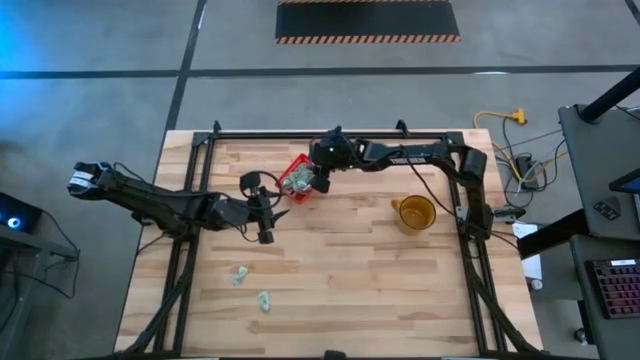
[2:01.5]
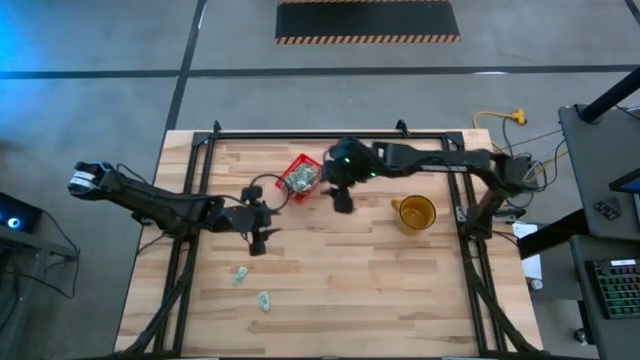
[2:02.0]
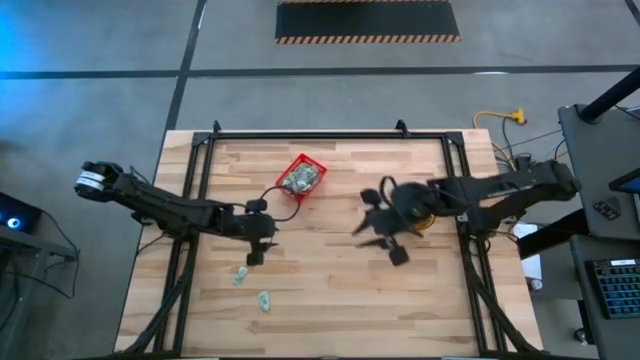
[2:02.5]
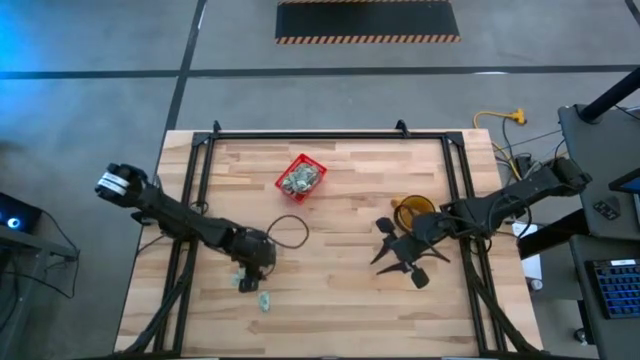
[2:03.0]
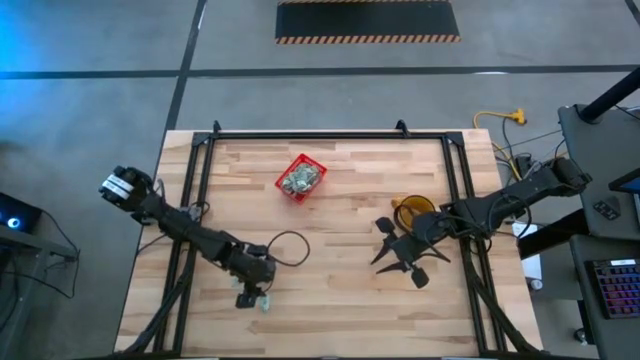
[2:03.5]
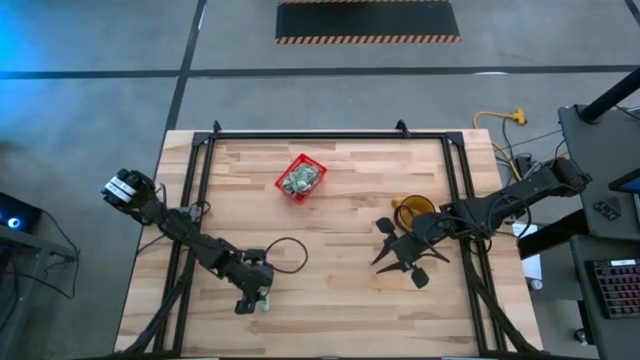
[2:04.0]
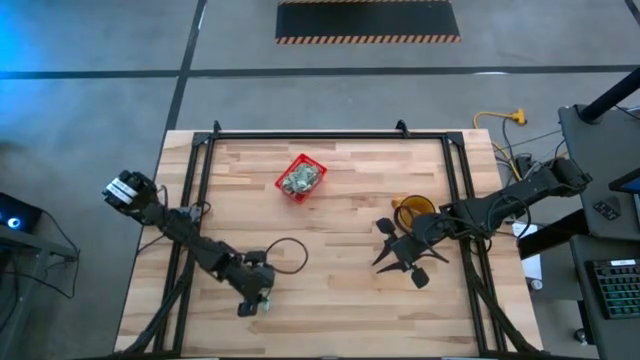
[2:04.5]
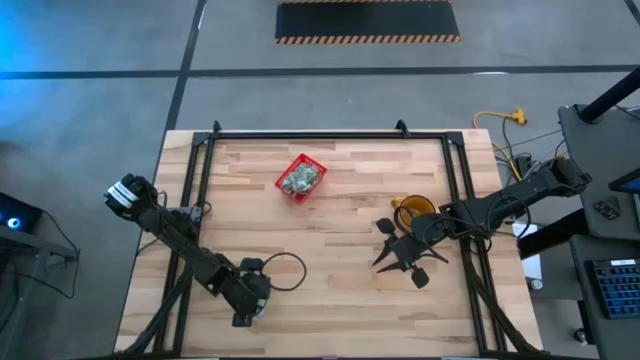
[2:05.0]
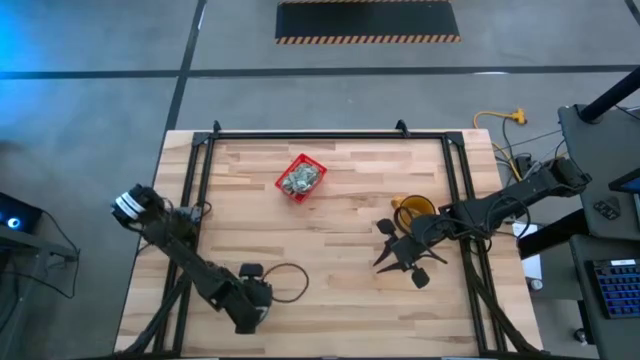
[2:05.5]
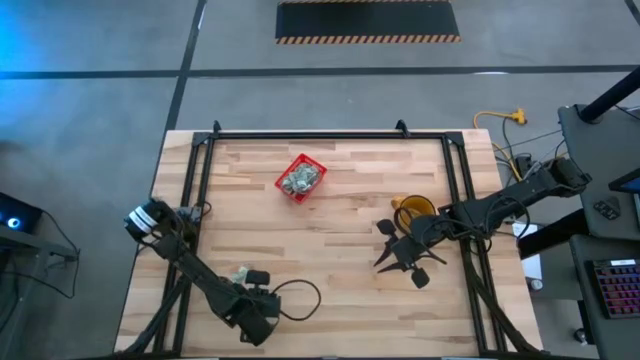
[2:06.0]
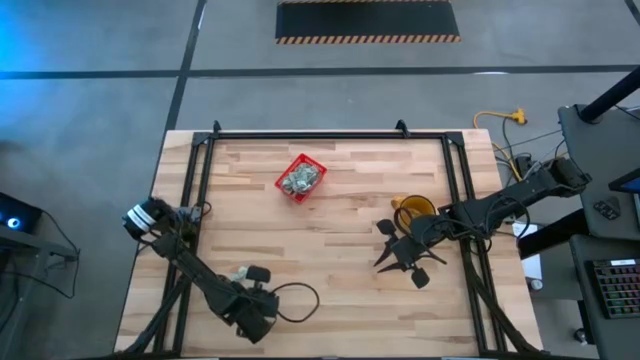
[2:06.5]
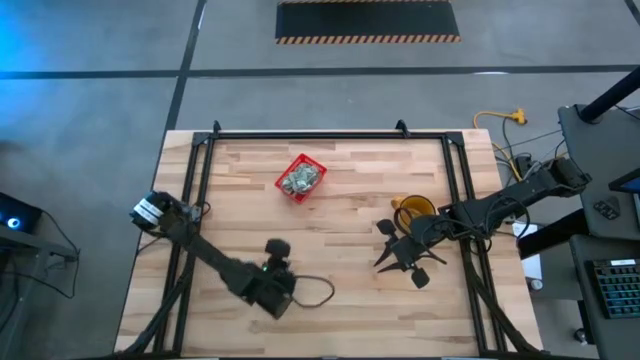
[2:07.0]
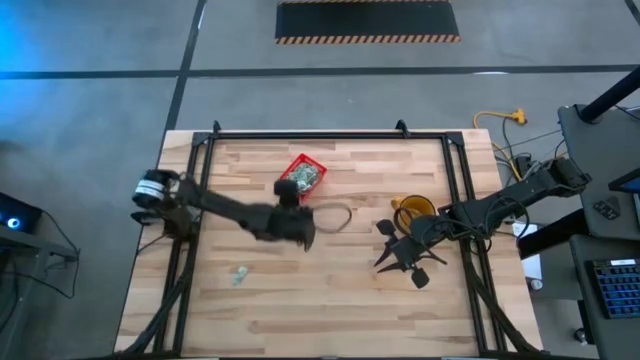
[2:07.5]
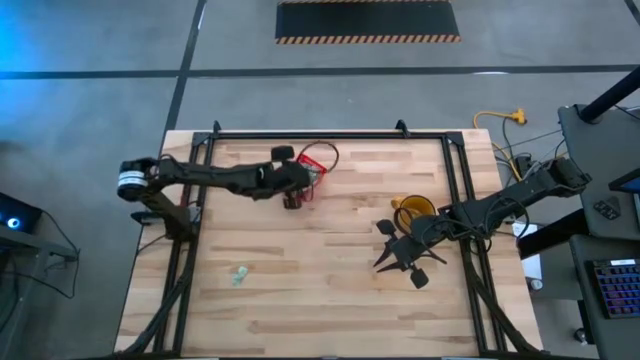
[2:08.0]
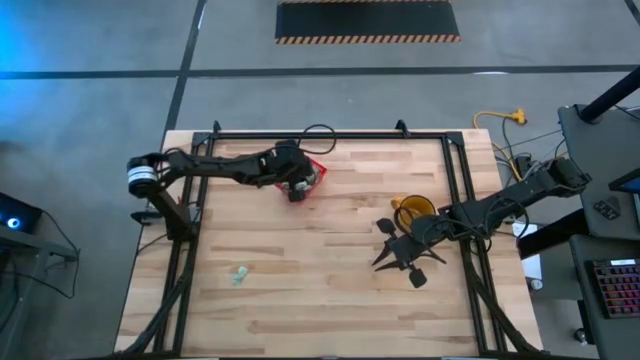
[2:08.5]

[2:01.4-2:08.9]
Task: Pick and place Stevia / Truvia into bins
Put the white stevia packet into the red bin

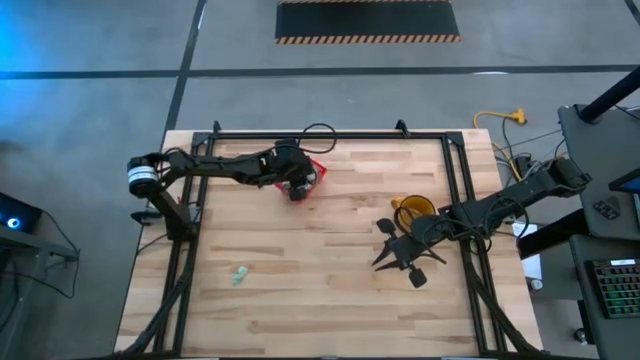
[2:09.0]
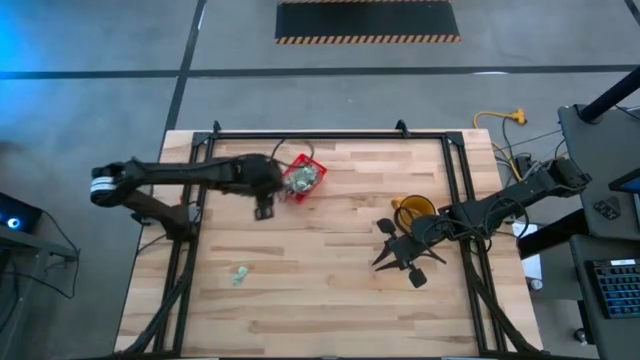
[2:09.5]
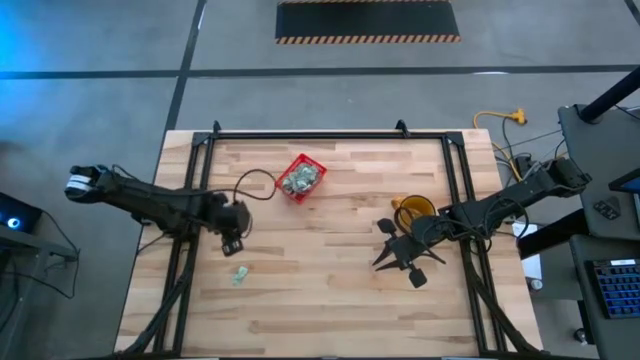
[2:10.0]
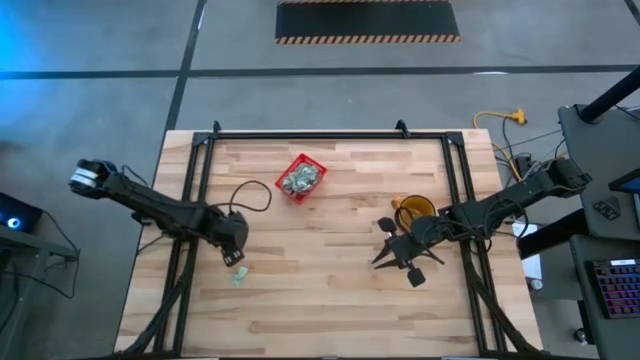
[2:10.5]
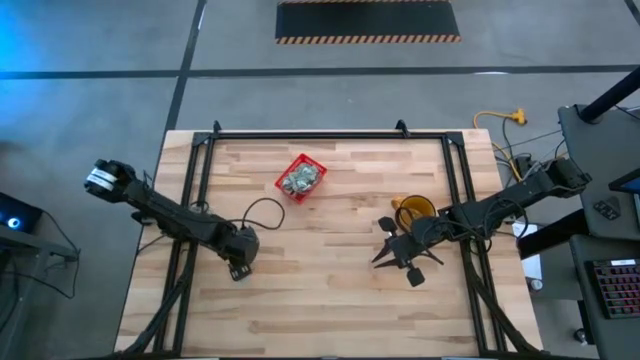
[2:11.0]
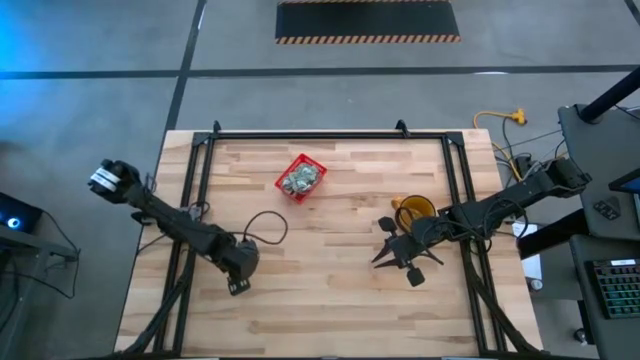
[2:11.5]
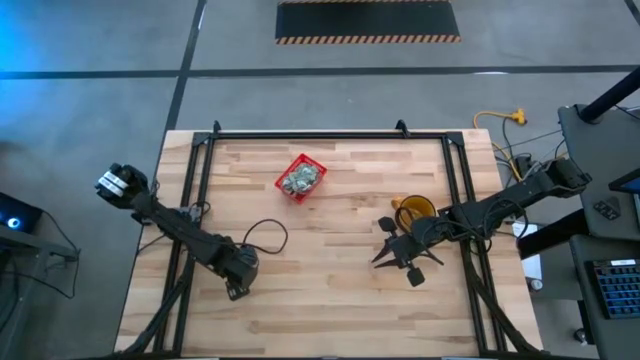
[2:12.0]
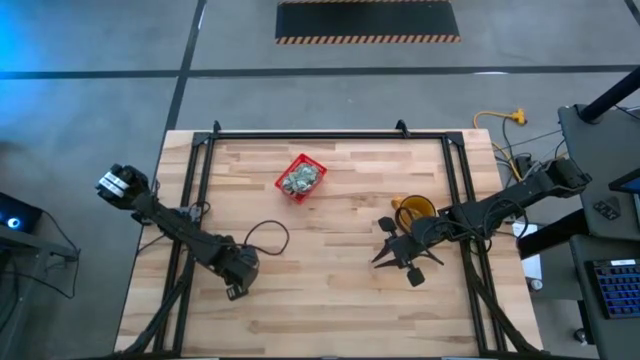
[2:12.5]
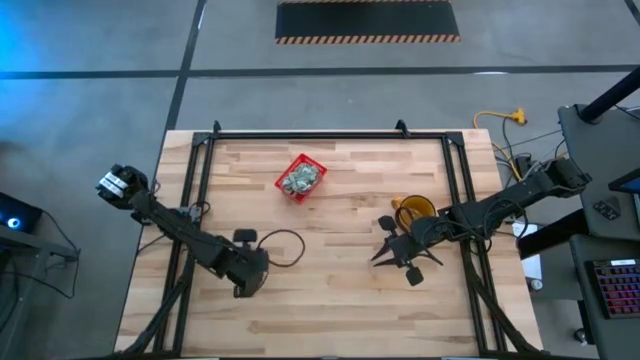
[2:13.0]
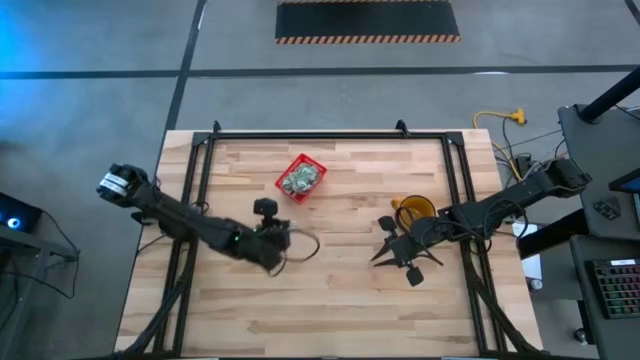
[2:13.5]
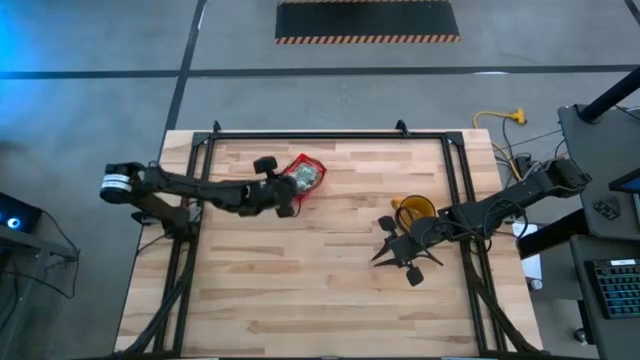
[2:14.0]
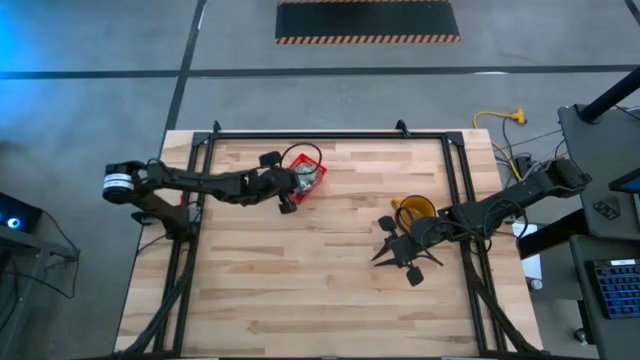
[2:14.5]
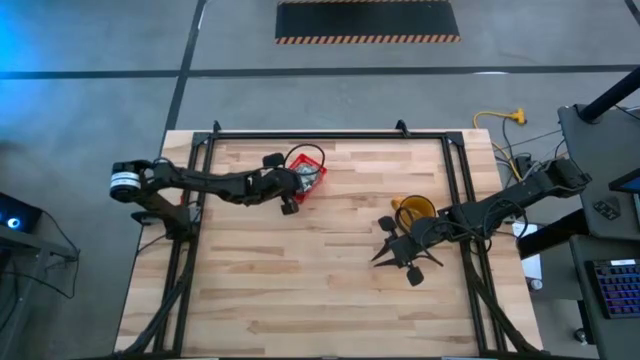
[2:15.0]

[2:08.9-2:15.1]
Put the white stevia packet into the red bin

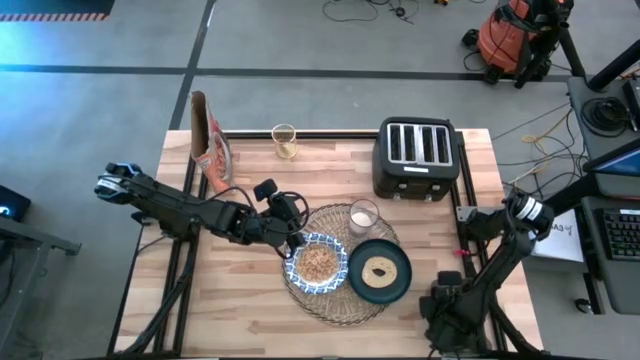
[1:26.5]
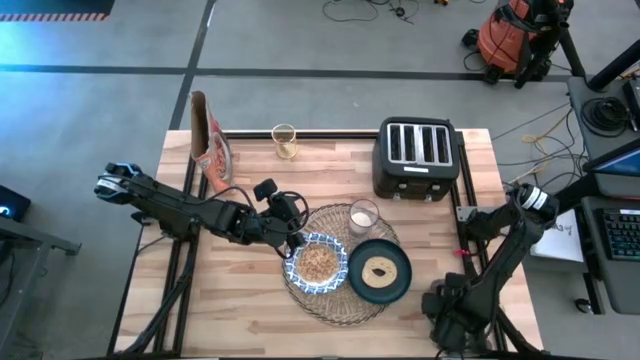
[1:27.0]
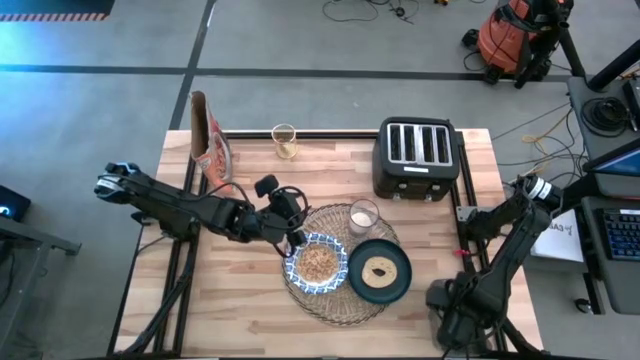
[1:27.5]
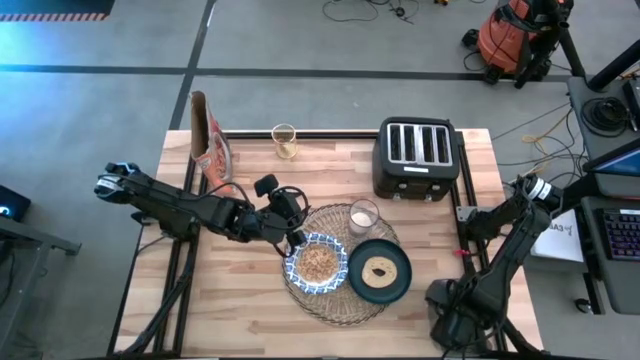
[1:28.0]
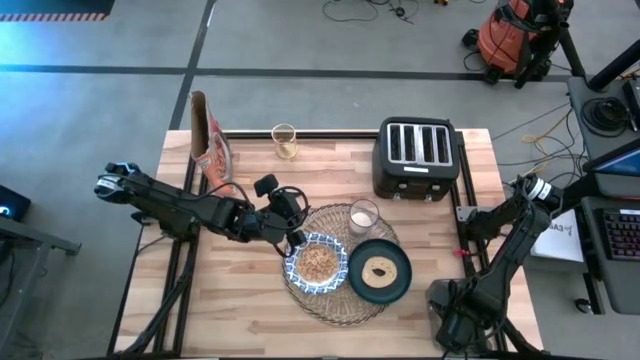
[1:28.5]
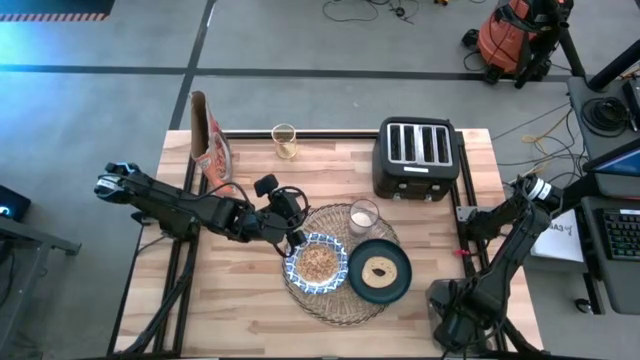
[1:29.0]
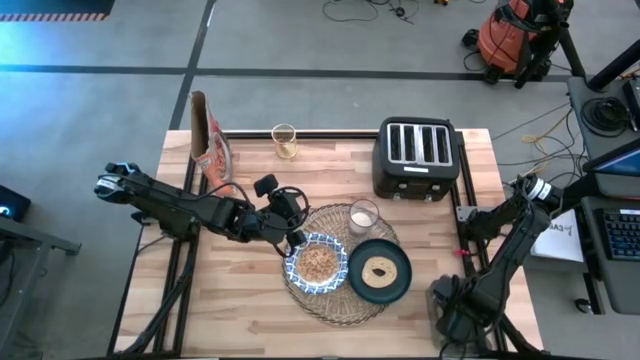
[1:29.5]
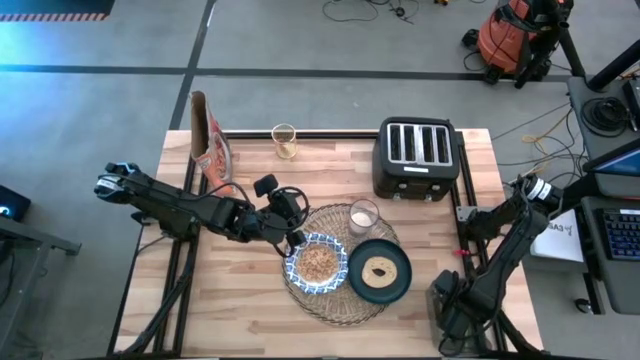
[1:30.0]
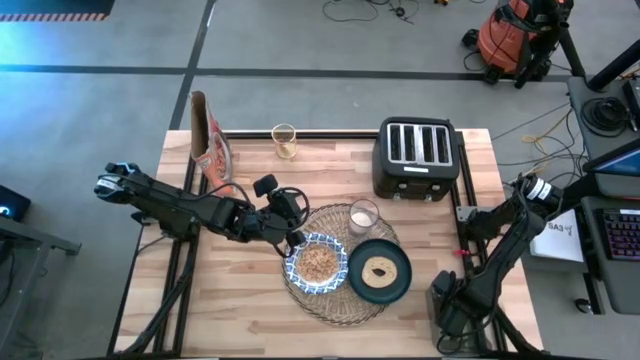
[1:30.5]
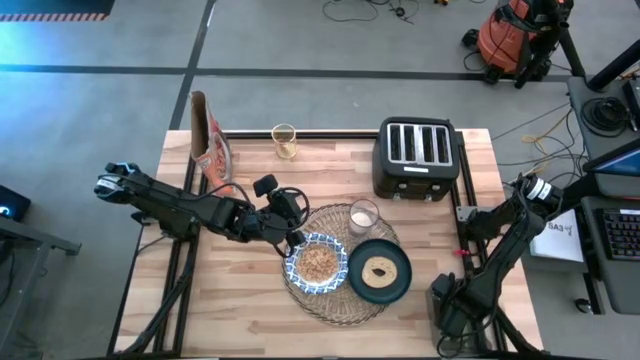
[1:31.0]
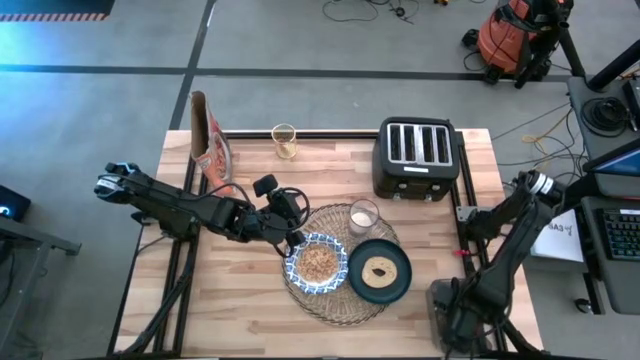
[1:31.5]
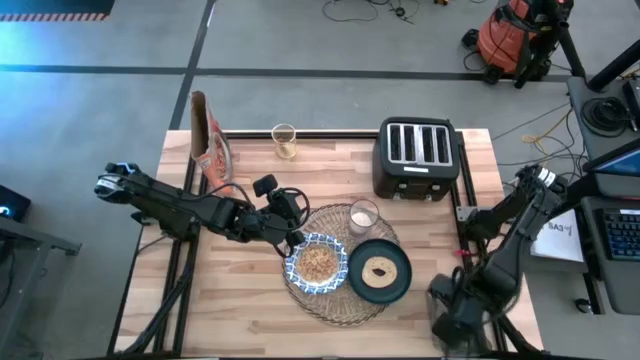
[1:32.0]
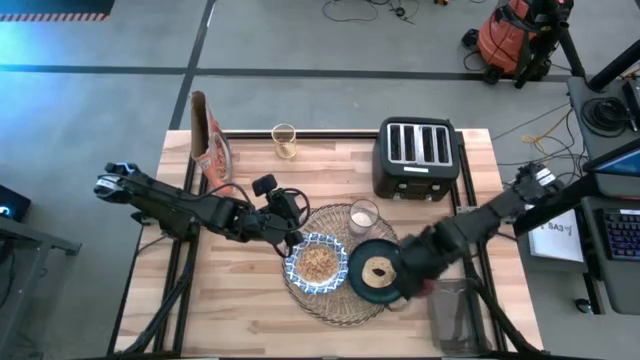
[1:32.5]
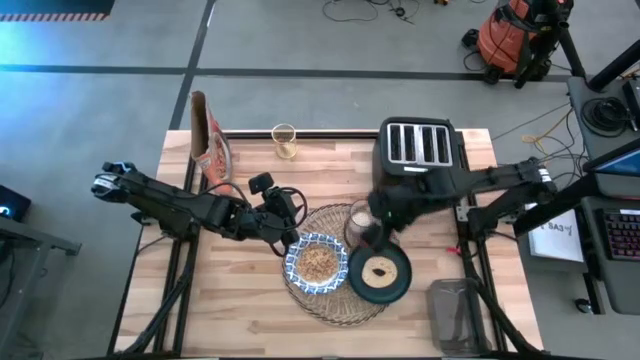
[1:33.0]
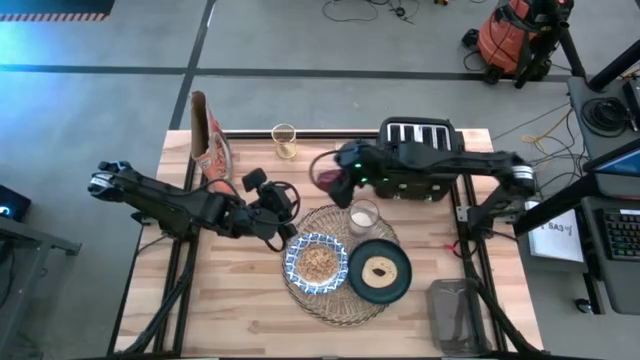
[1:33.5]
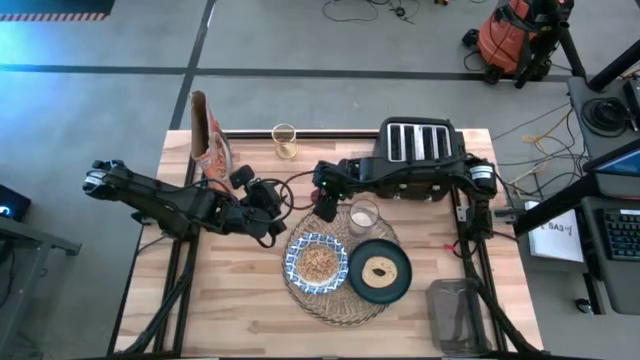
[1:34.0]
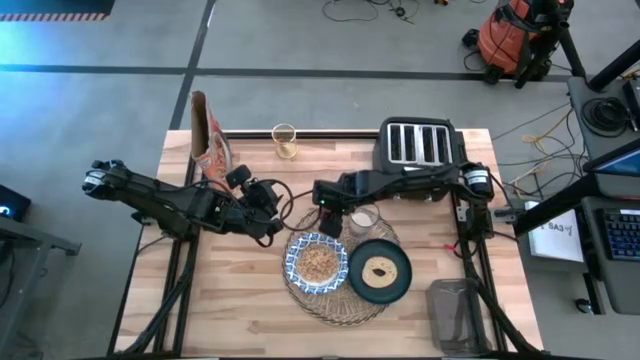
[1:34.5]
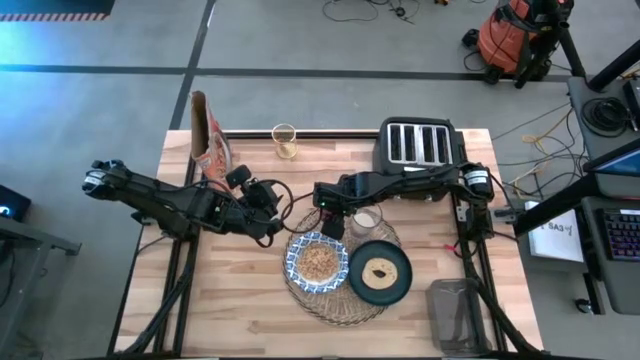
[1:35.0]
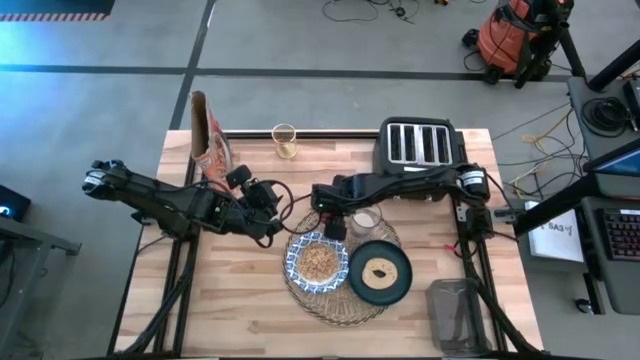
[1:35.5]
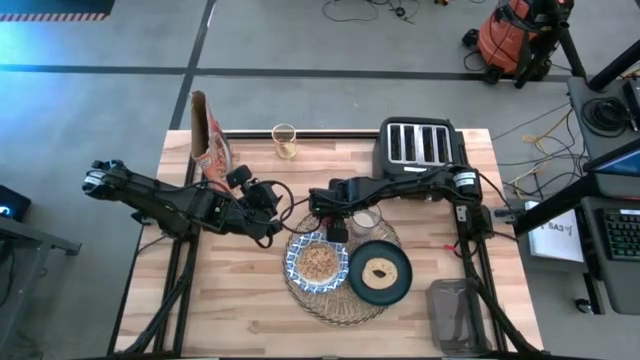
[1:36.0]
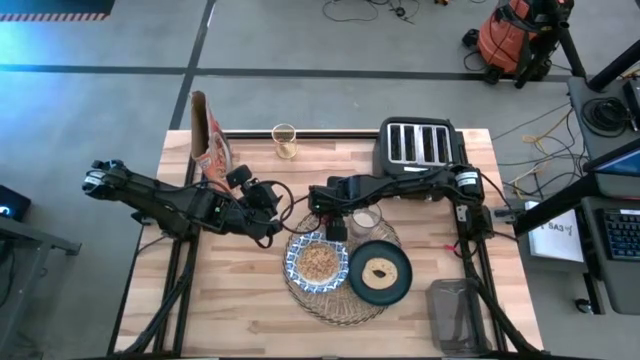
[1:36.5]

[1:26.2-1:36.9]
Task: Arrange a breakfast setting
Put the red apple to the left of the transparent glass of milk on the brown table mat
